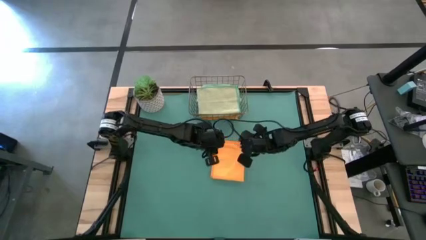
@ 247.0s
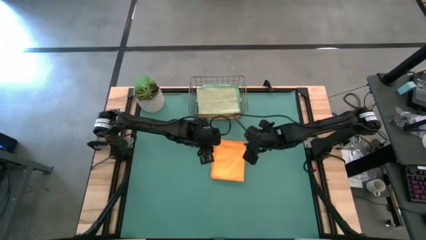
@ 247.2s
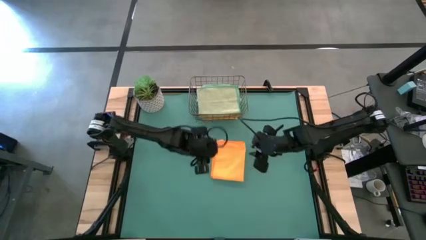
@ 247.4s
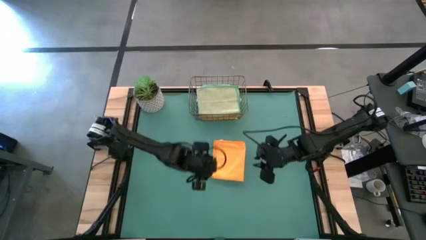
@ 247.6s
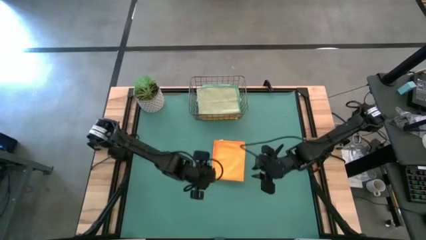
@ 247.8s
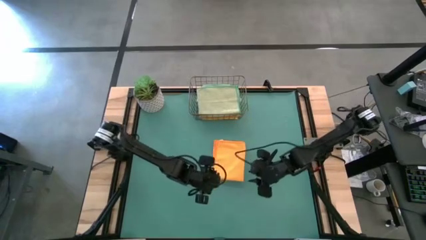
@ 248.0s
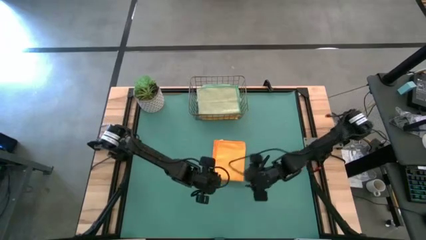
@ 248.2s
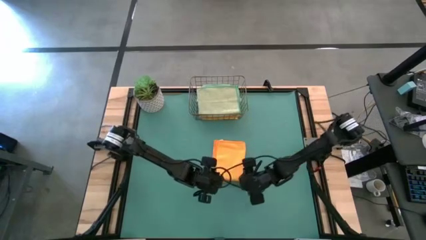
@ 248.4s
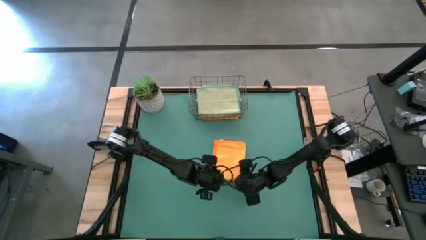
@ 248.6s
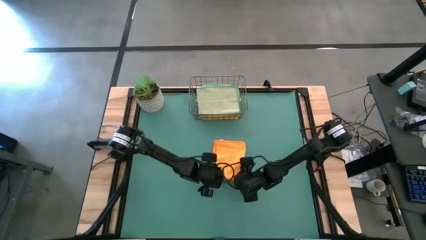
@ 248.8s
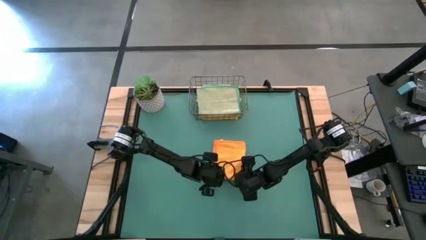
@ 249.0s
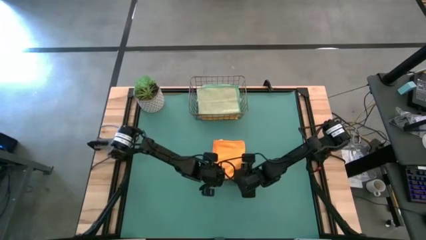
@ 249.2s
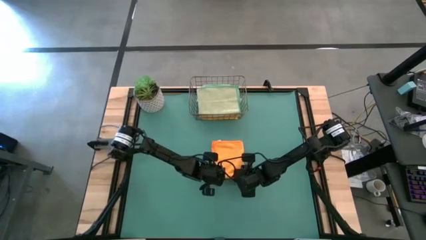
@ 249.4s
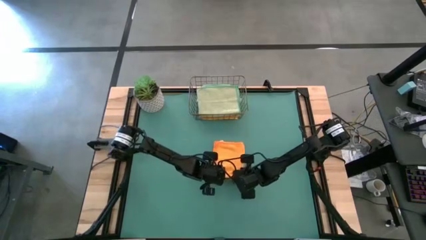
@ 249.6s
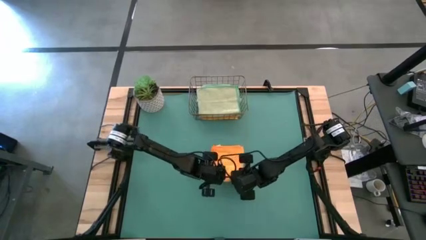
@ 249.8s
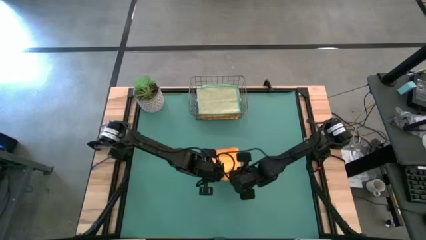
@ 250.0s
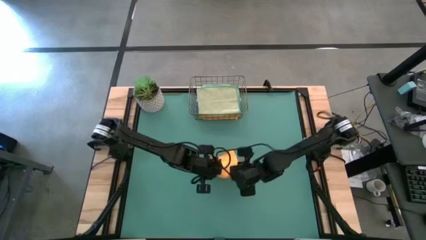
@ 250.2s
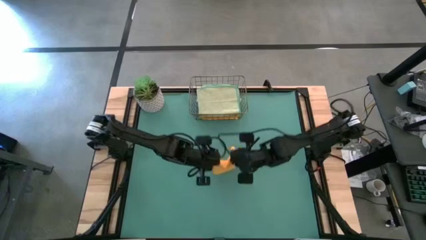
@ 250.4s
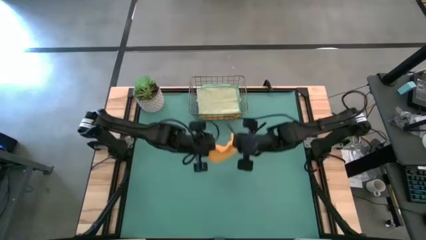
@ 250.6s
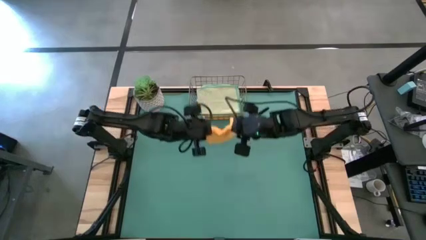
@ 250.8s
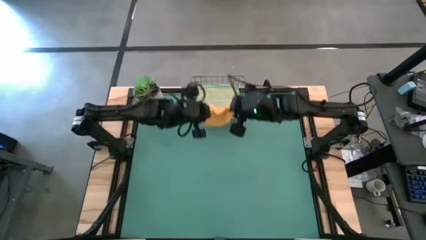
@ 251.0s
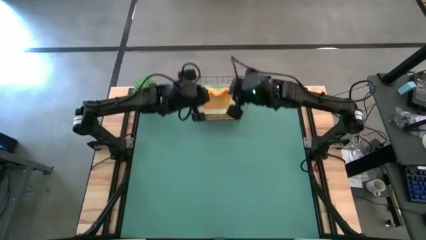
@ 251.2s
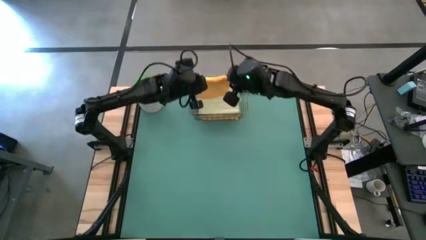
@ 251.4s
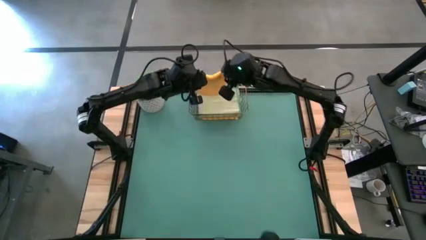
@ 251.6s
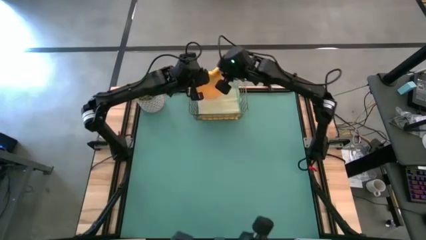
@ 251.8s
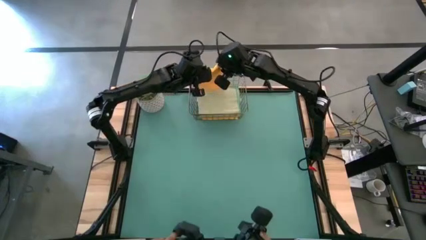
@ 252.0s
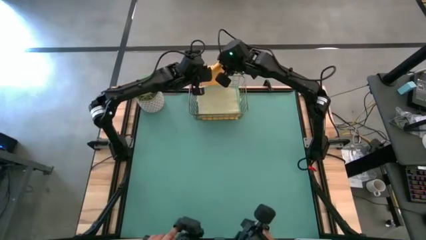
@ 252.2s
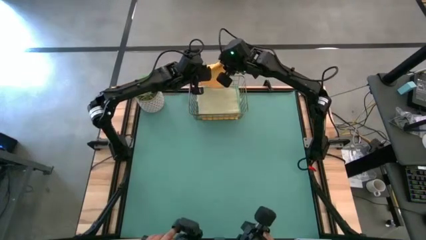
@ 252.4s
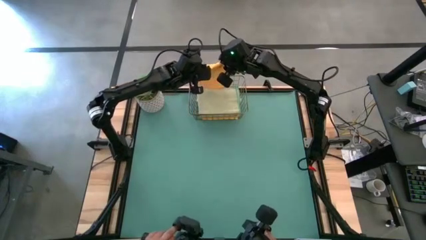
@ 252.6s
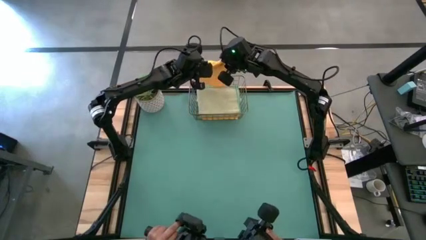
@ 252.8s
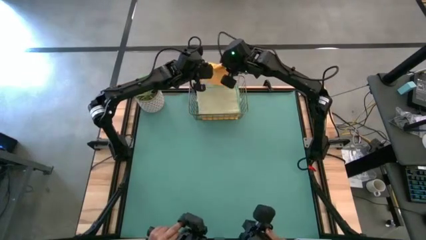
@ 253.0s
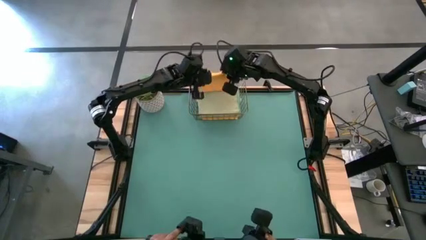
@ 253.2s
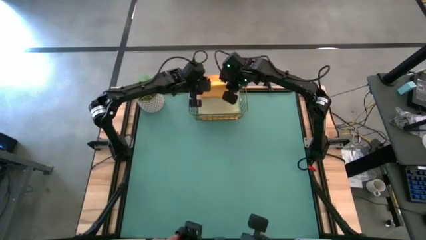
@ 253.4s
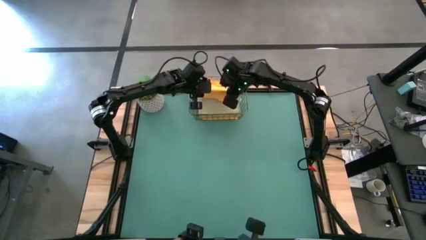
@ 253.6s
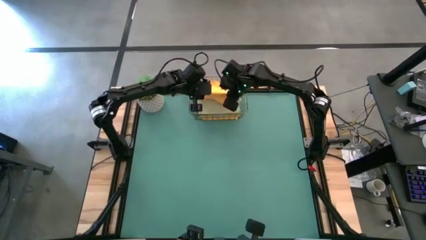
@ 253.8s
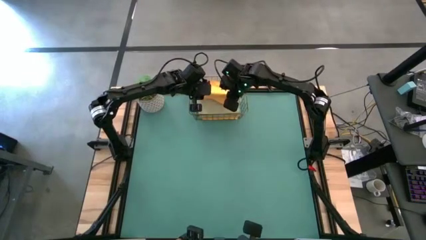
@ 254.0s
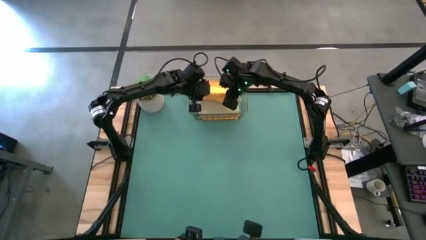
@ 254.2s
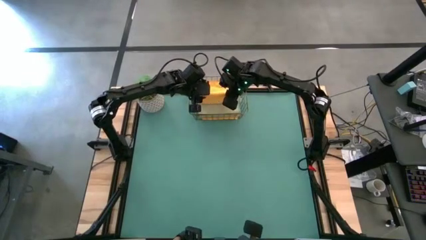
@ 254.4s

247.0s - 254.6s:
Task: Fold microfiber towels
Put the orange microfiber cloth into the wire basket

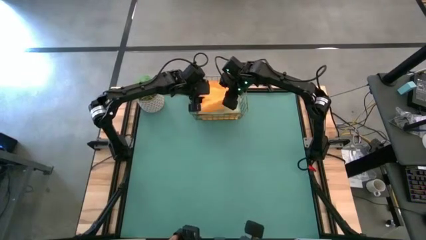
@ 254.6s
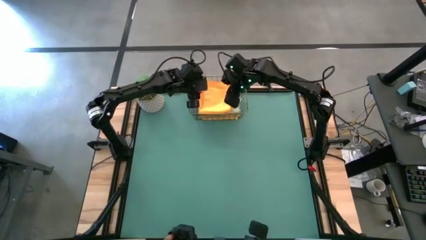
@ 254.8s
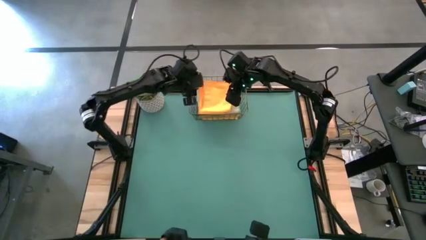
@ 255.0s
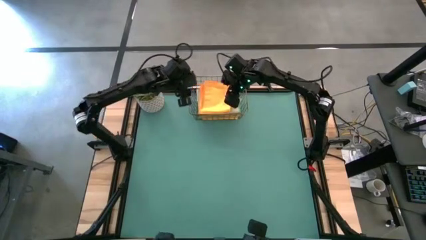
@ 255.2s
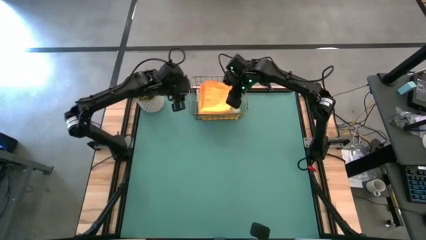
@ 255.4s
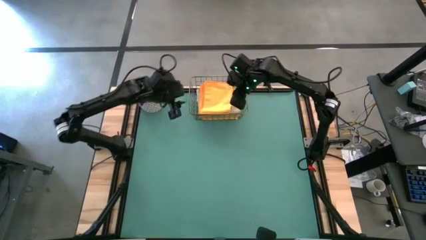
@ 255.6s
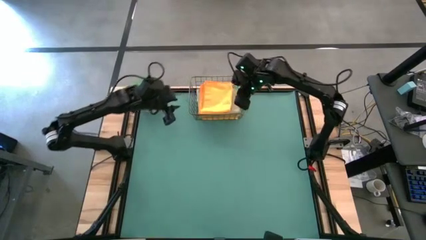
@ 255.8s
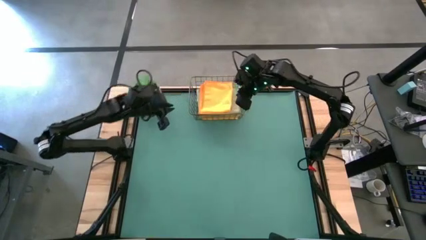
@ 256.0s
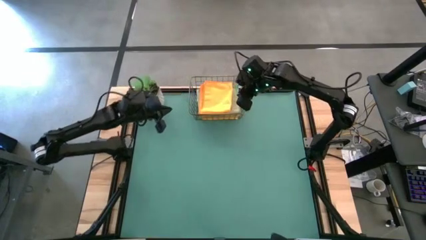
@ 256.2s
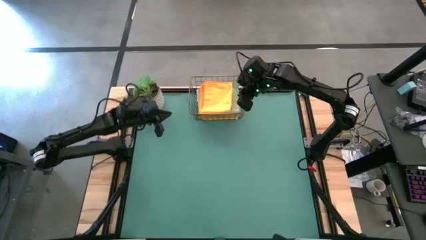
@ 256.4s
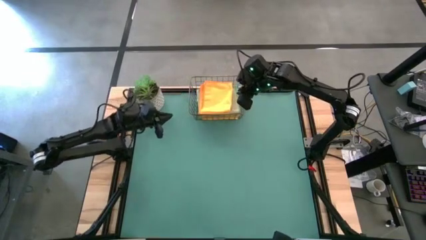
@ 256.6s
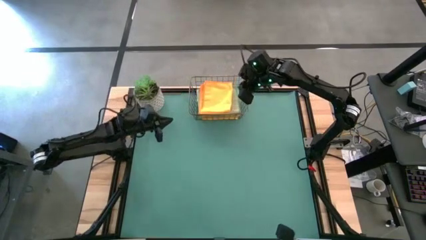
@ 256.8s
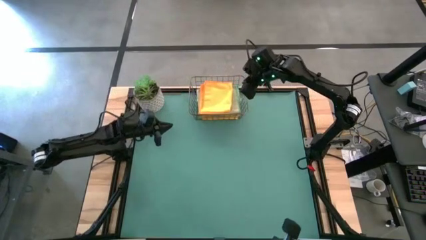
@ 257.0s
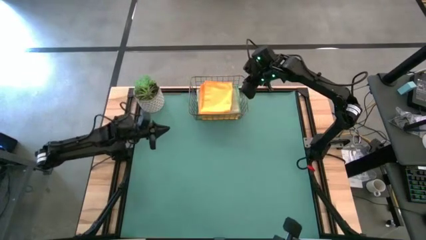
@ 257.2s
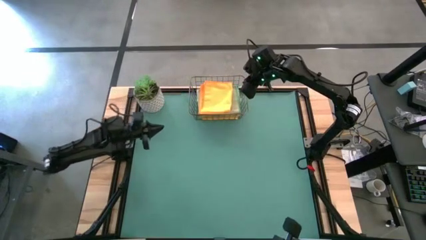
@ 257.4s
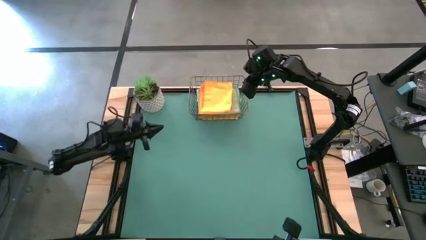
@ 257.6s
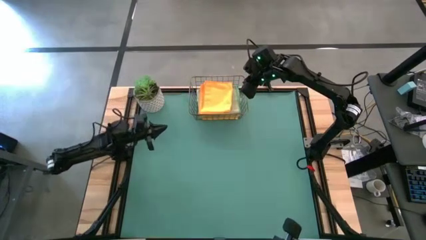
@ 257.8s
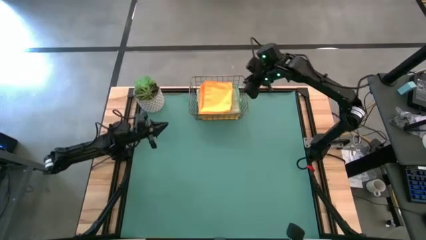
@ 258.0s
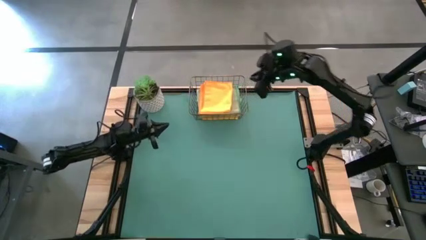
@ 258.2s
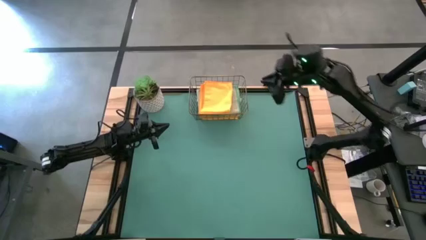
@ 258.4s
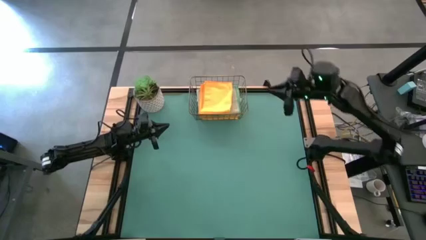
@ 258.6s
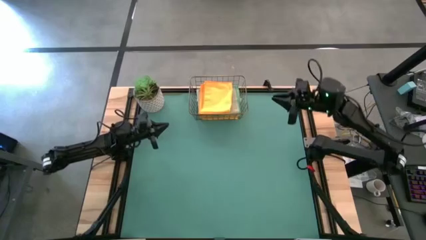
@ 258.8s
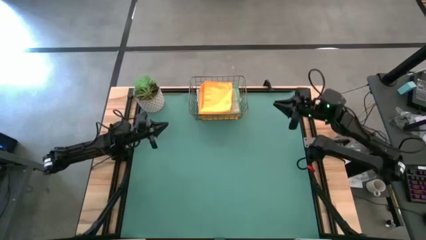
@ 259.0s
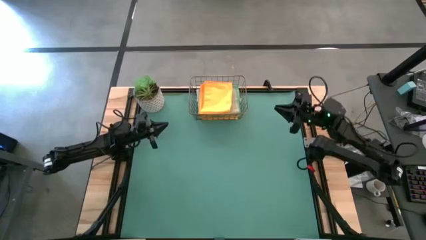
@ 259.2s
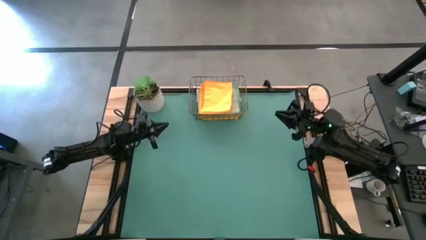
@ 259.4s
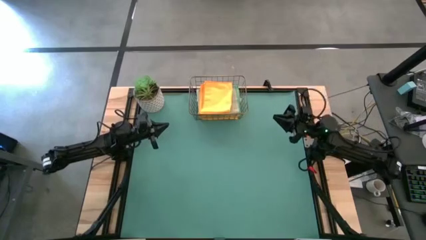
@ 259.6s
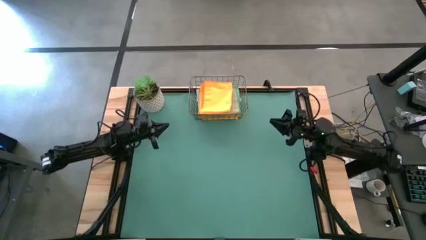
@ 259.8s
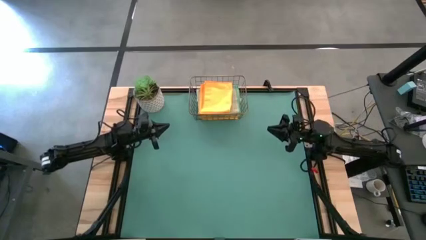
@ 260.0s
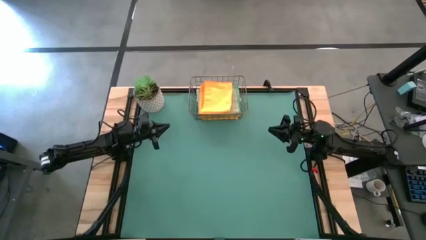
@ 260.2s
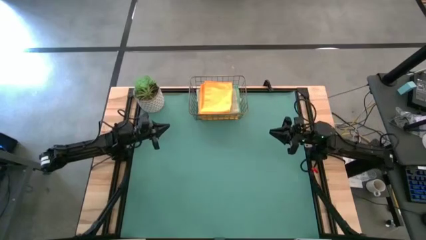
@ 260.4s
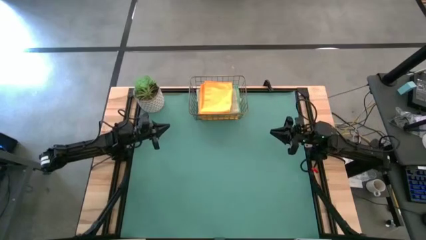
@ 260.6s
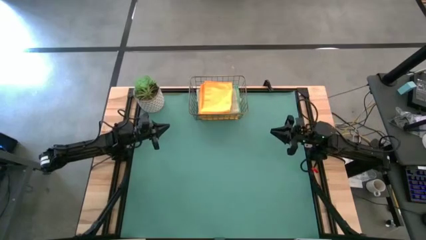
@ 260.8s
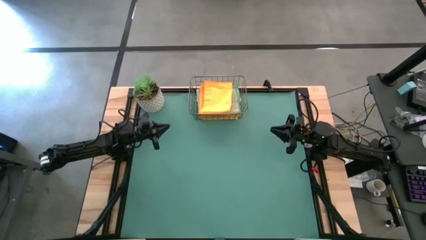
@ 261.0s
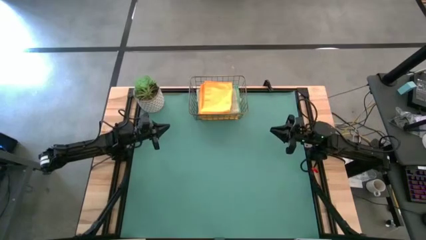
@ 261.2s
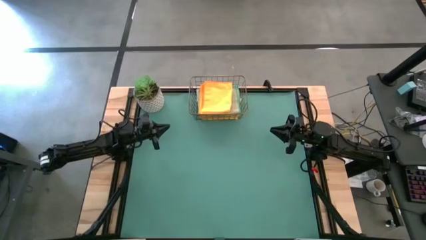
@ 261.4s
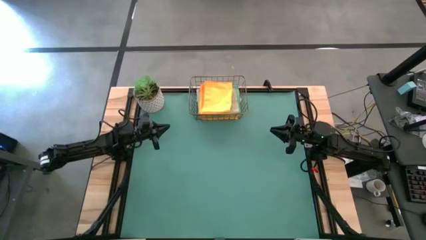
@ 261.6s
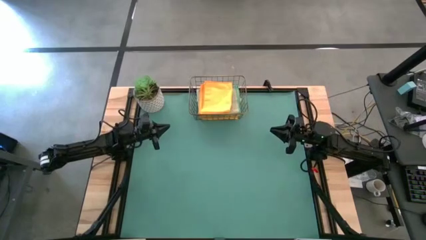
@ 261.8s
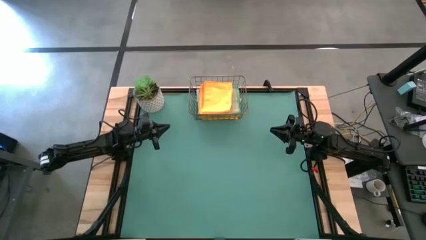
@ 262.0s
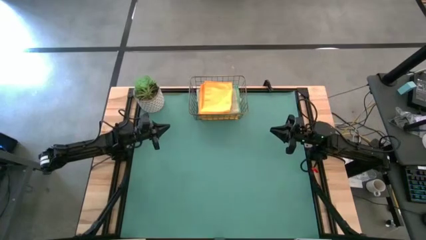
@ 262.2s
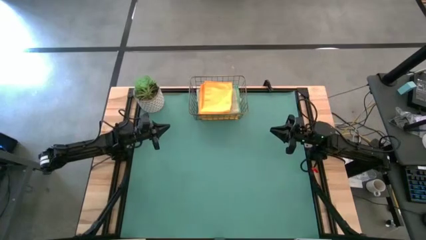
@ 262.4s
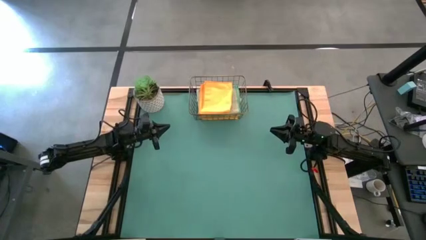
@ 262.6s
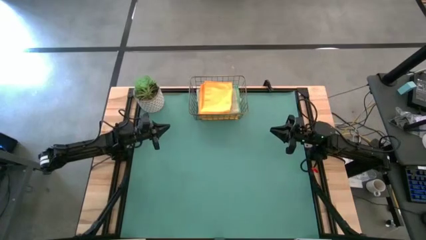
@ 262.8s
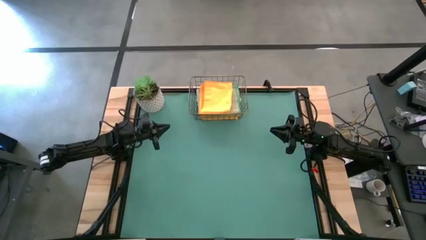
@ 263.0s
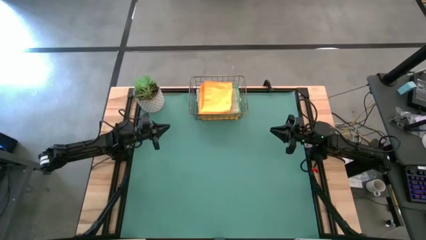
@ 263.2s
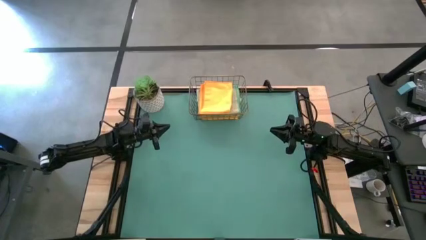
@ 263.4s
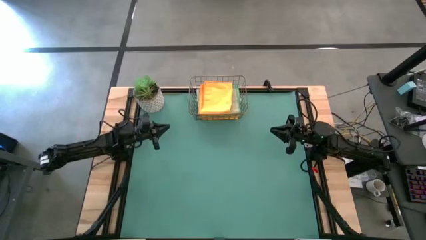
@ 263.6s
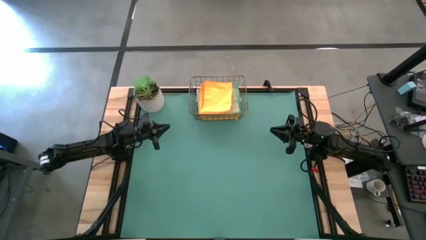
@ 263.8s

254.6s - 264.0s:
Return to Home Position
